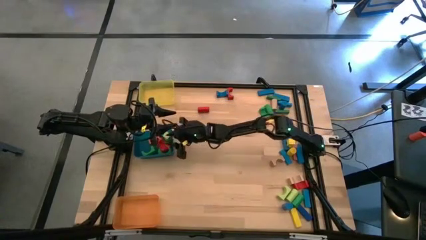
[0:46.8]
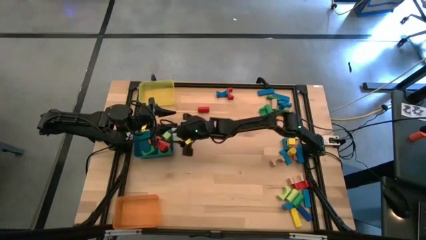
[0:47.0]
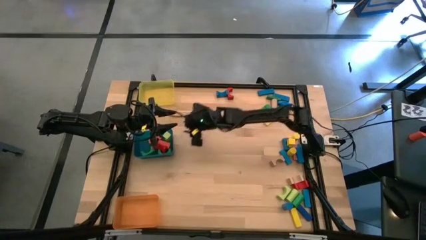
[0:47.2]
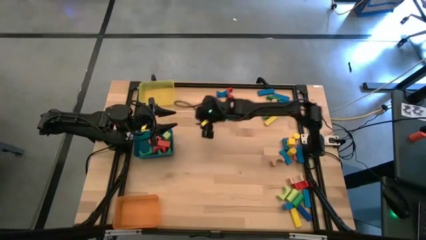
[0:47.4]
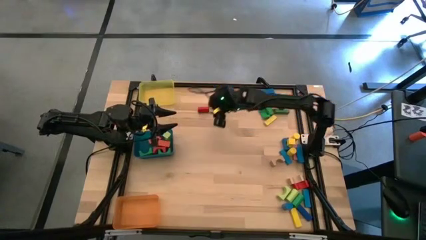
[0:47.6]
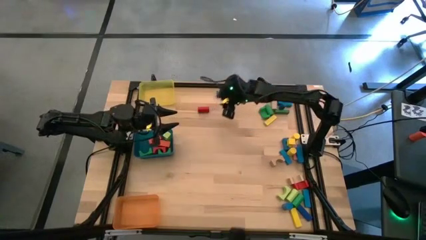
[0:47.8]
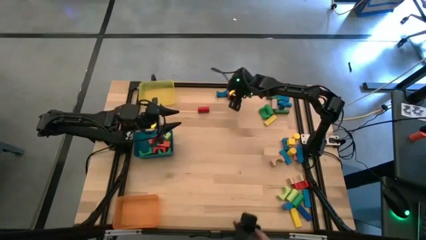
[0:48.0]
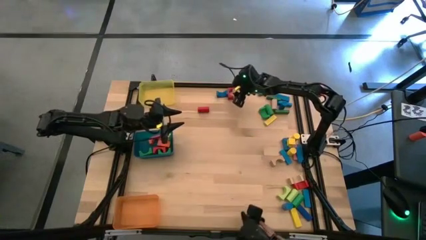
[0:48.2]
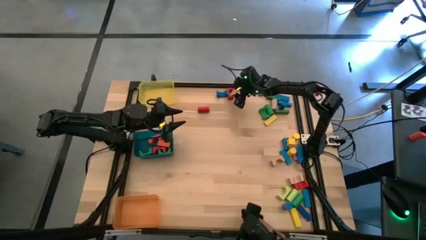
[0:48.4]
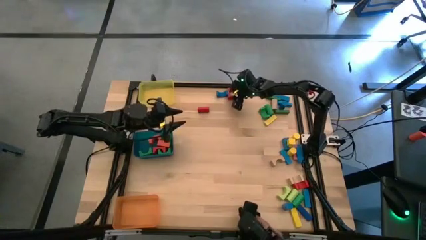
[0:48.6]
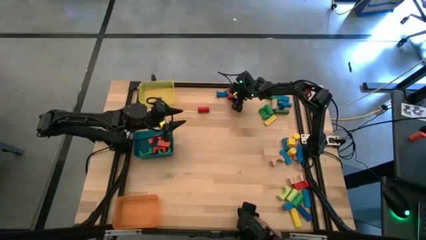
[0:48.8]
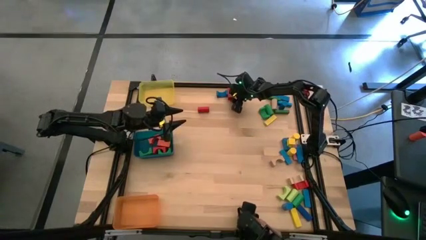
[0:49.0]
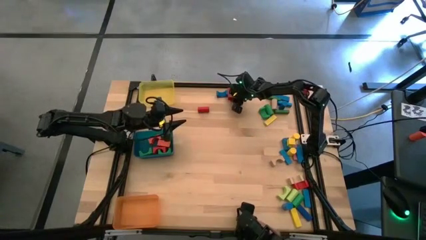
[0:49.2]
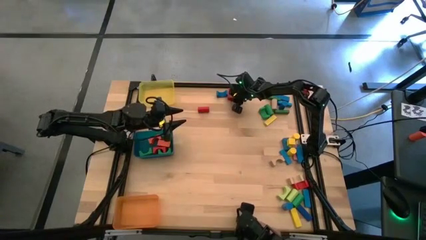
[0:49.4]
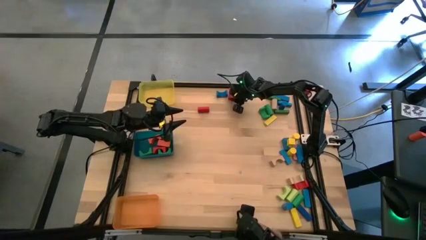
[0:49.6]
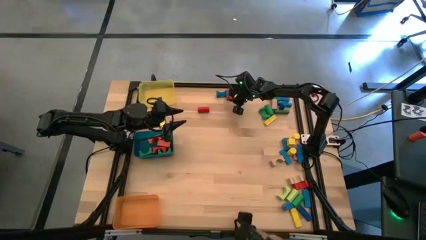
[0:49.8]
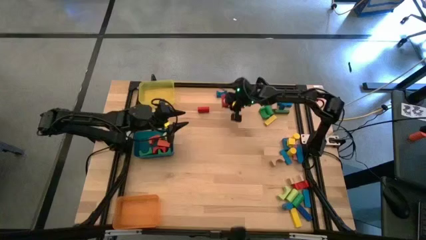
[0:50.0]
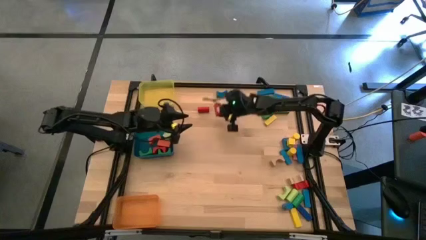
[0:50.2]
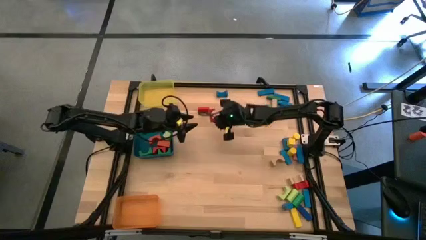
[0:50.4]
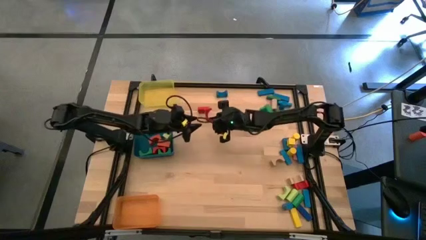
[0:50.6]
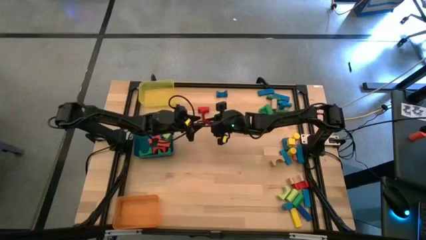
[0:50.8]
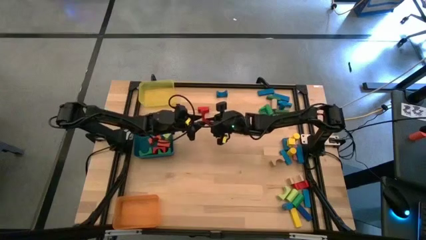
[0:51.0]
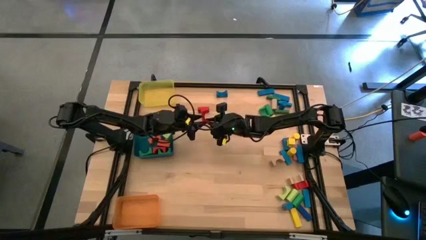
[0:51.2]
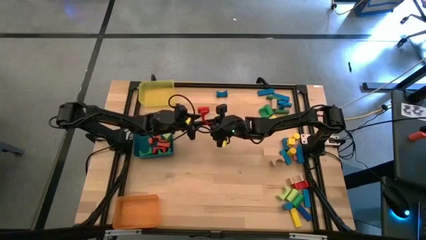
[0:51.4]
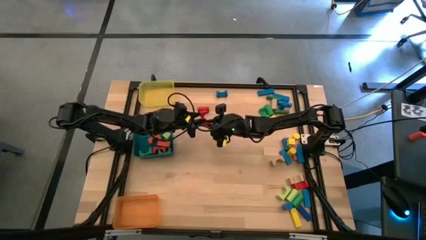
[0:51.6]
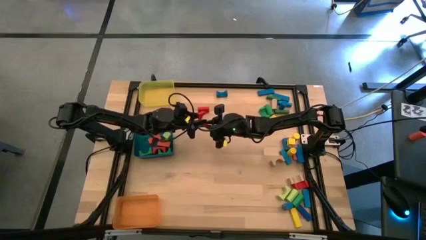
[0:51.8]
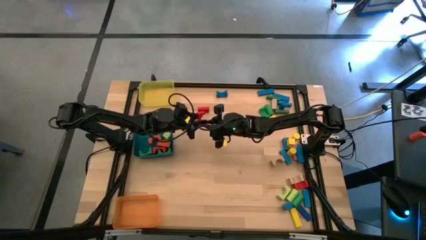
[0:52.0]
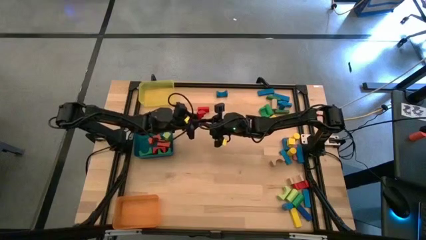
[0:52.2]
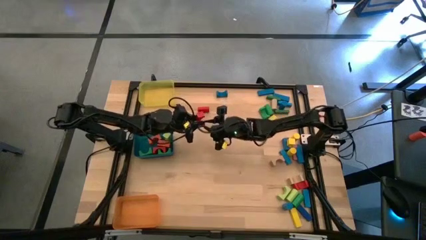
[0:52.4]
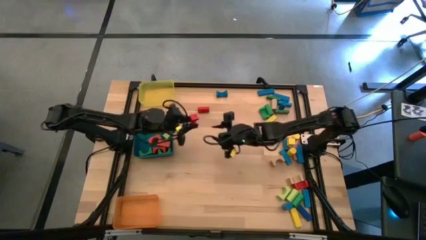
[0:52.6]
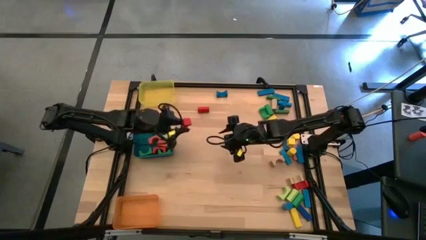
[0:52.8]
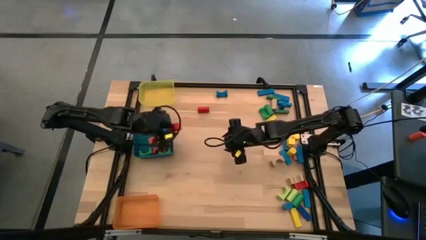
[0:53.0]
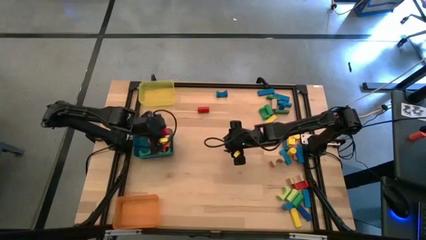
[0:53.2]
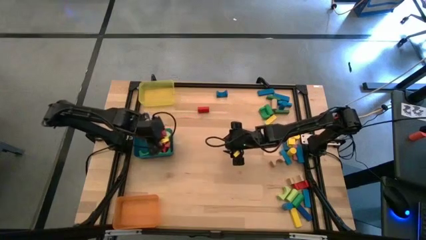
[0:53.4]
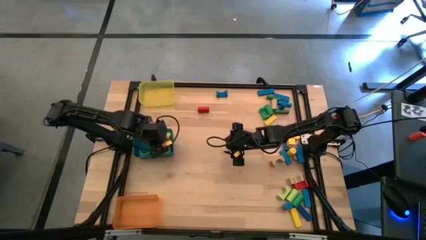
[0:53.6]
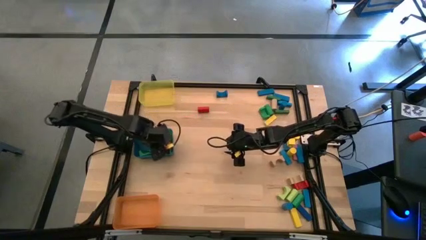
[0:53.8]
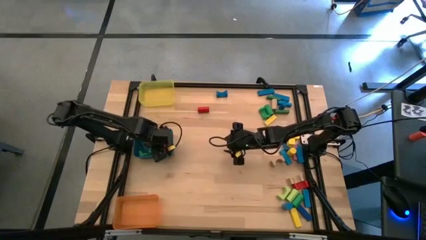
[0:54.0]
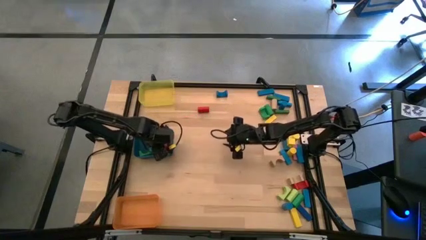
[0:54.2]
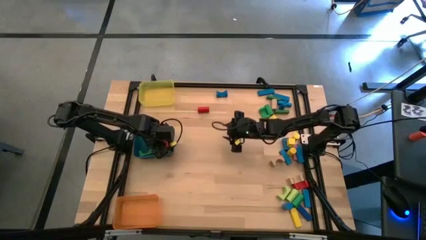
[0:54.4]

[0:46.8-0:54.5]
Task: Sort blocks by size
Put the red arch block into the blue bin

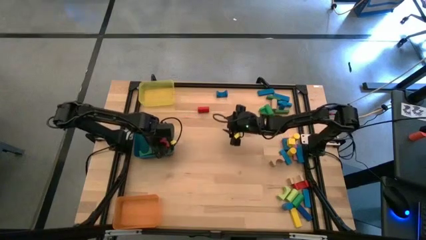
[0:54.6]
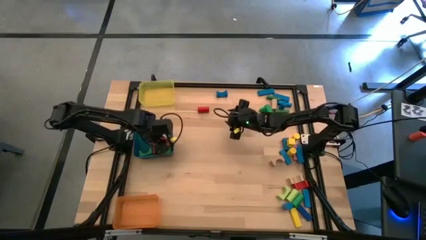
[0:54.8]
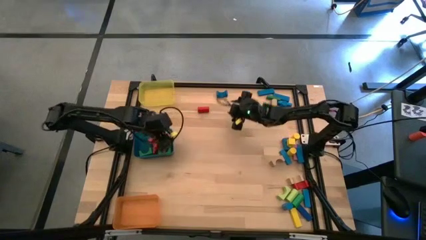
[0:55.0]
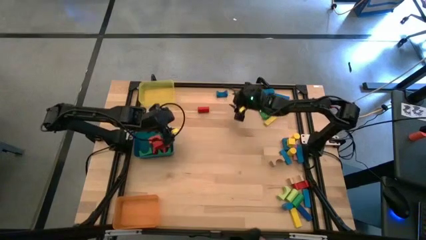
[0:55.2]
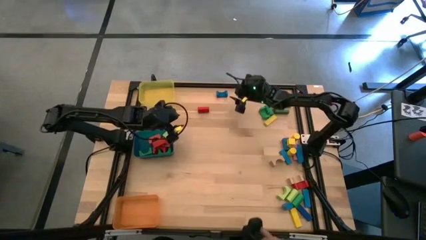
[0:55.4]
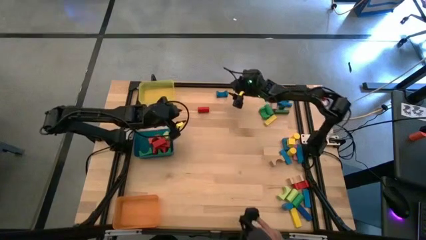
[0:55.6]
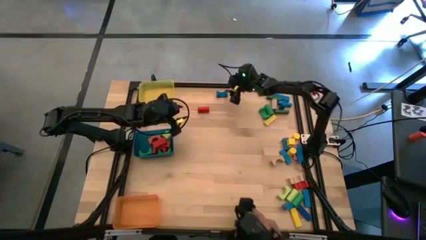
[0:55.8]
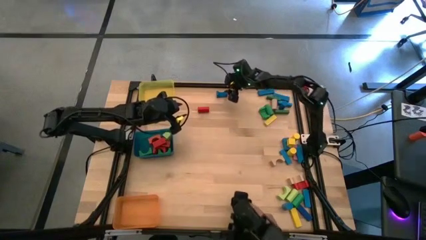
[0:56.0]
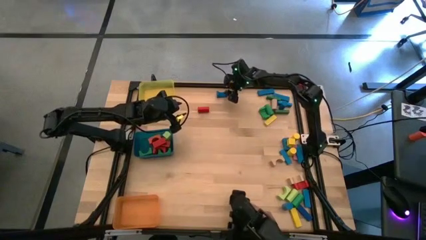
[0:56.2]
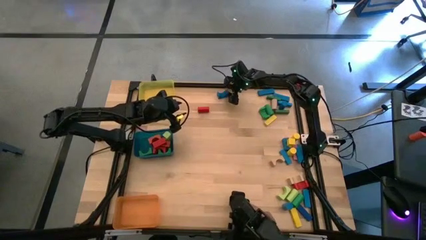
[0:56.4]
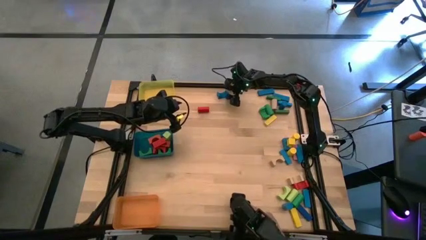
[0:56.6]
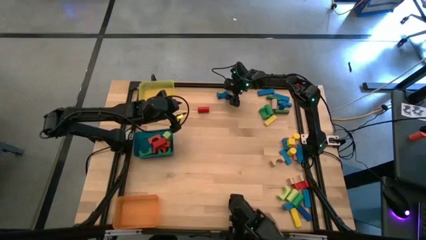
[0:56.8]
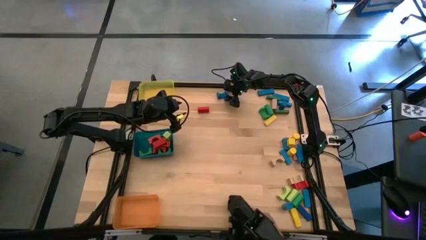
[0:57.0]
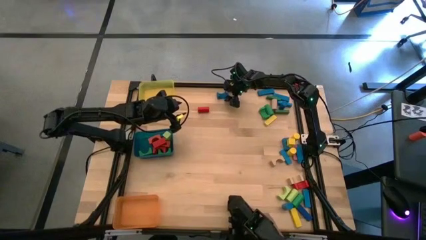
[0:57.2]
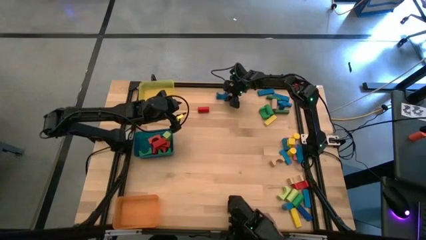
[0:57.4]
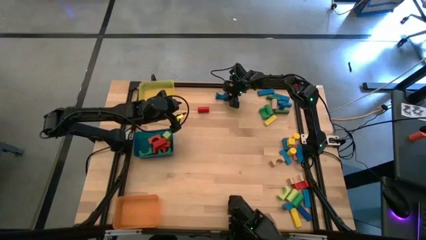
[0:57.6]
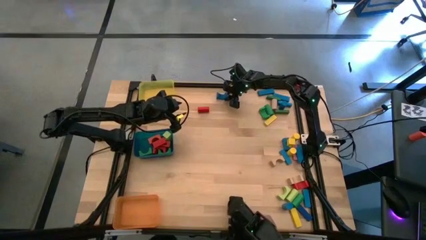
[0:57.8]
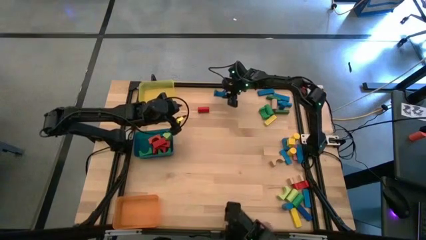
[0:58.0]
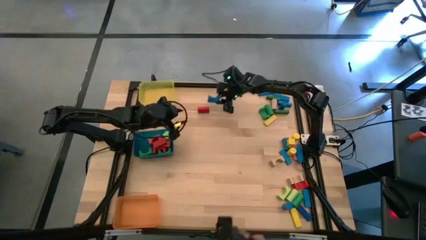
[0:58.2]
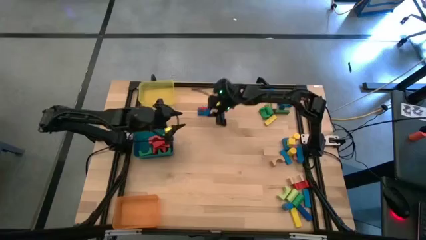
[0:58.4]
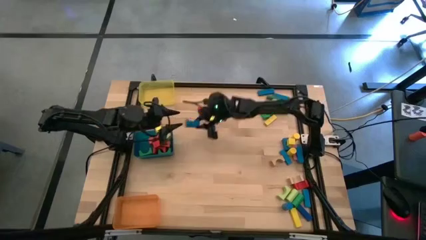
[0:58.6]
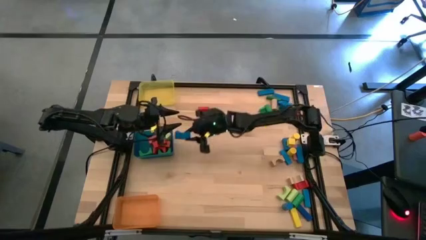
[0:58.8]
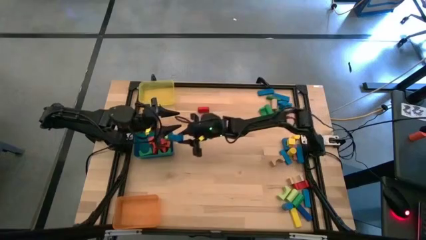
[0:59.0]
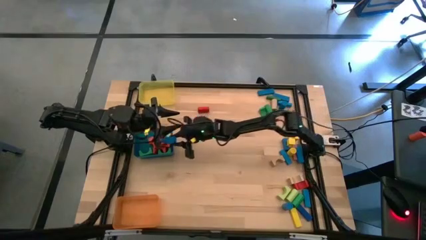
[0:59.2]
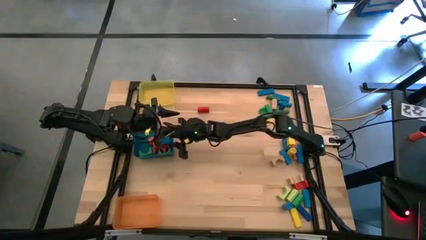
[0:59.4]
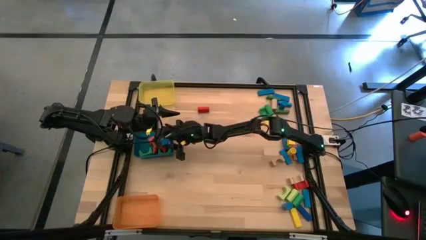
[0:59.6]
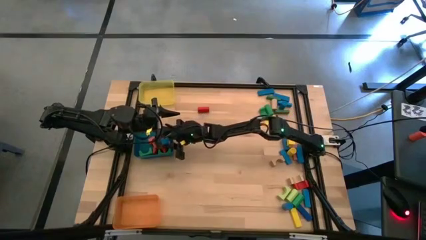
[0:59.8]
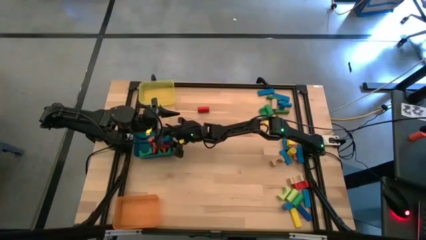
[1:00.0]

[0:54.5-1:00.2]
Put the blue arch block into the blue bin

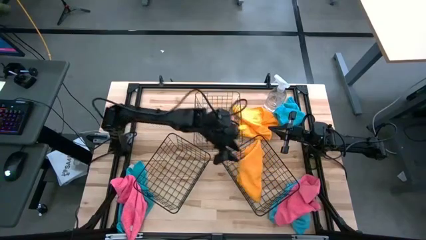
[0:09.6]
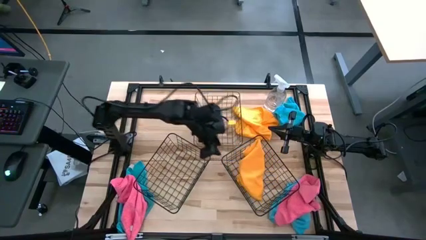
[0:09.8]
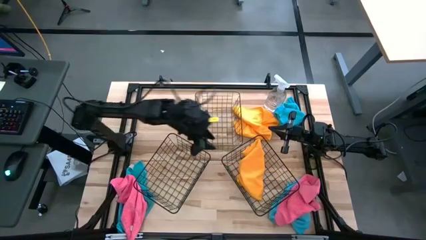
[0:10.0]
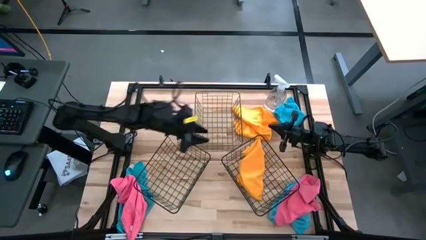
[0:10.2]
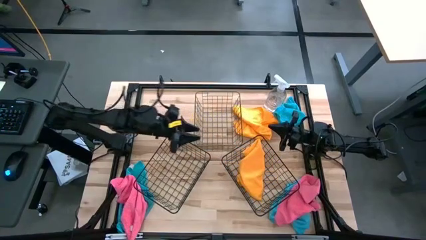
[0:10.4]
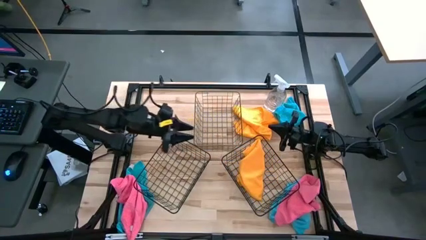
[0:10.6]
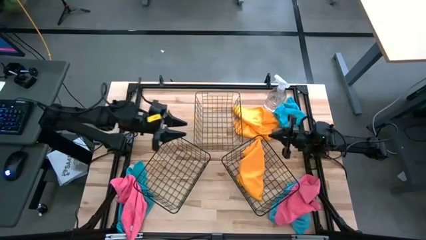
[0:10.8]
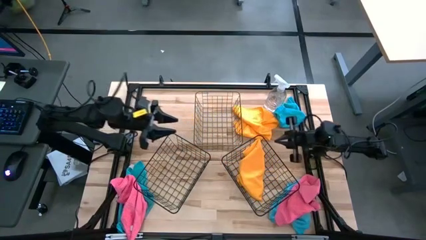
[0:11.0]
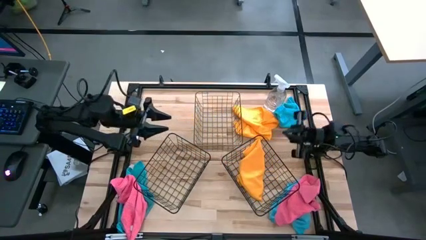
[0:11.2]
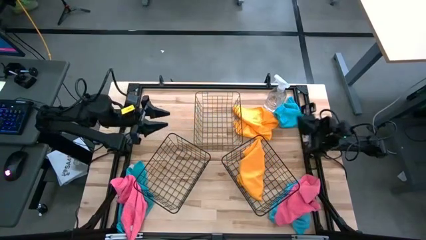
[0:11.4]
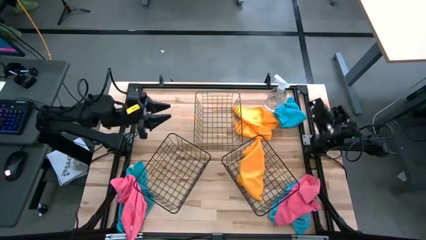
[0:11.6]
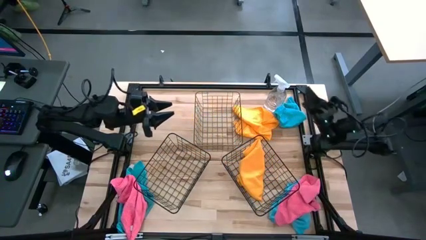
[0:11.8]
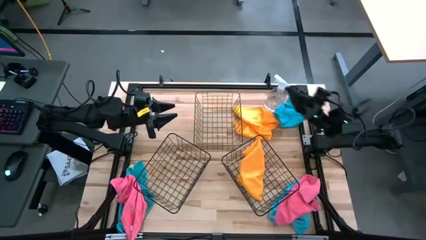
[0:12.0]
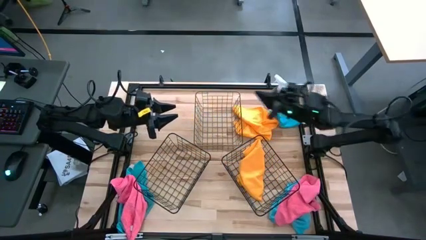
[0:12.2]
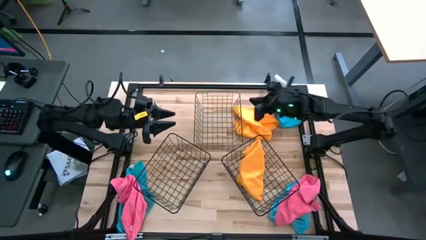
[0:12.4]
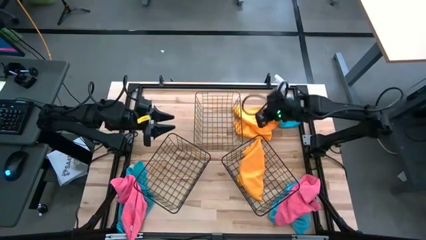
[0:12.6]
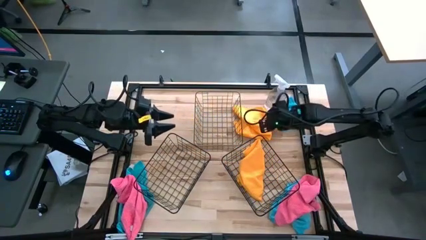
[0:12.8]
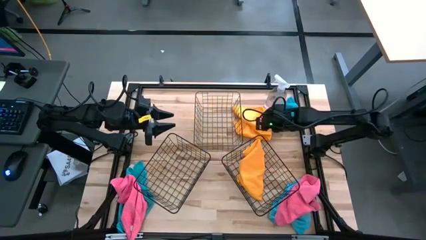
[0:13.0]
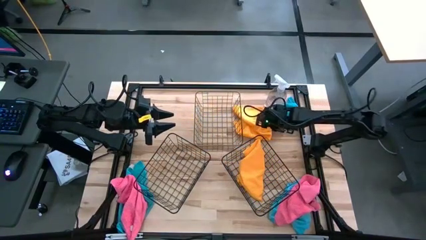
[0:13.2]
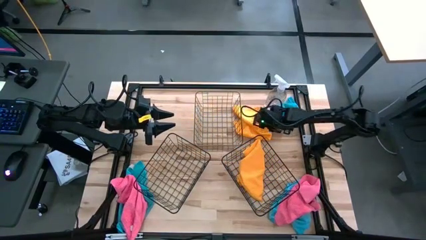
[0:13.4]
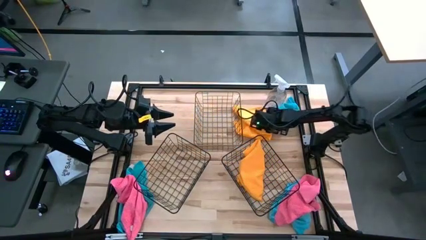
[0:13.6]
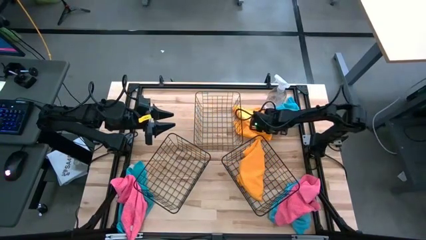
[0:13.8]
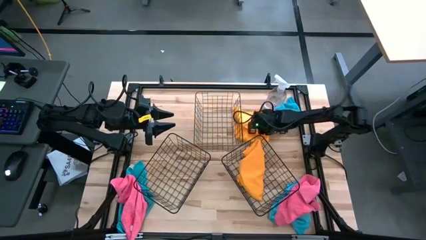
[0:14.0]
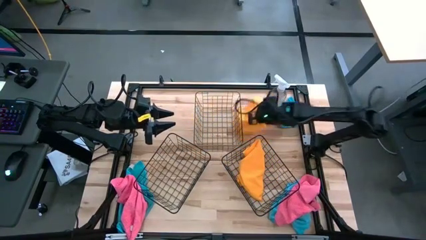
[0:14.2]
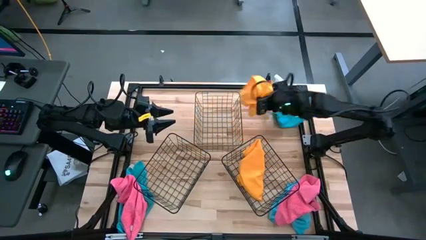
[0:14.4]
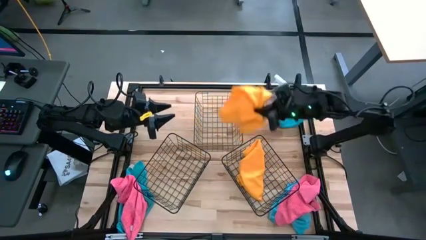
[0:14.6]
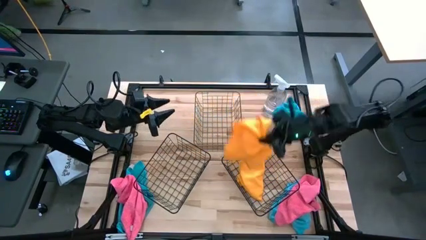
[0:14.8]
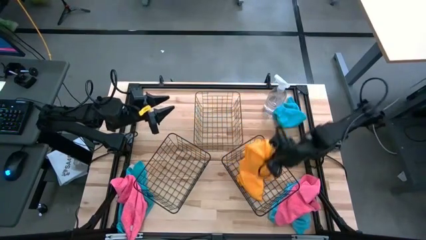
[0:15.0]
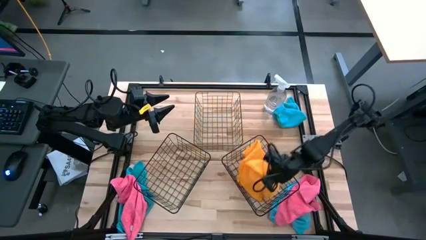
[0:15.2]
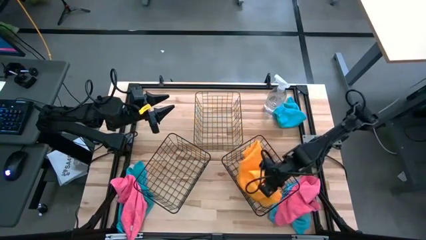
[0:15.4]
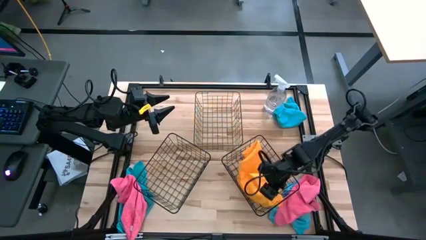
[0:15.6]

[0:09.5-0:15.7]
Task: Sort microfiber towel by color & place in baskets
Put the orange microfiber cloth into the bottom right wire basket
